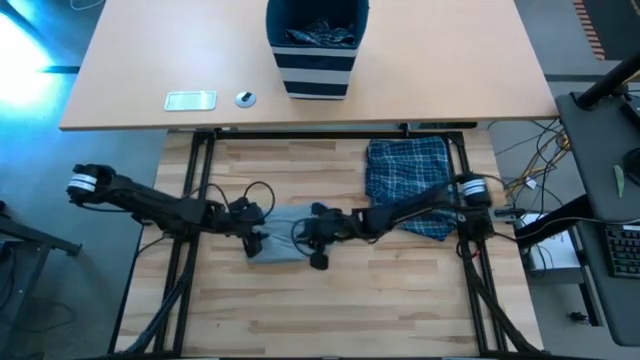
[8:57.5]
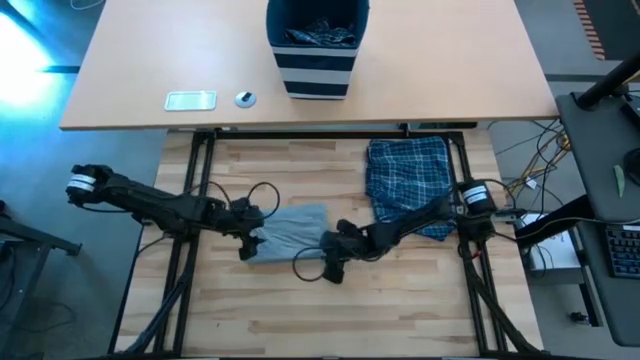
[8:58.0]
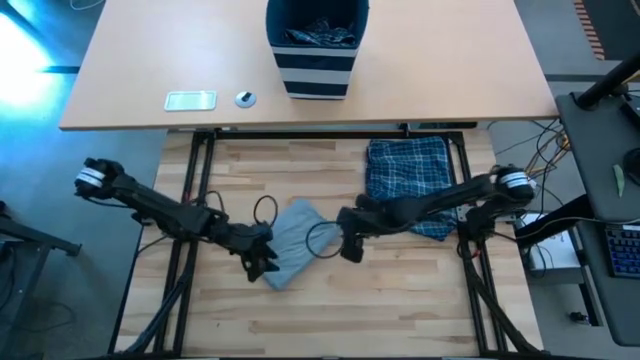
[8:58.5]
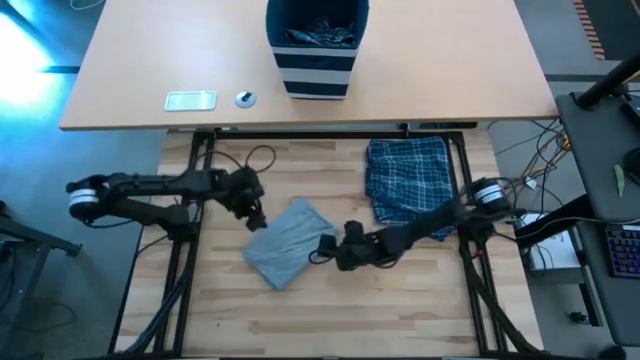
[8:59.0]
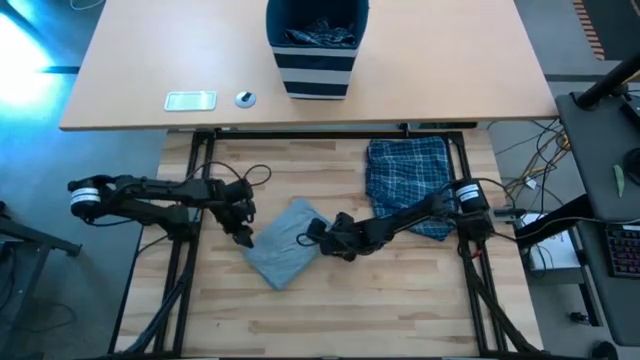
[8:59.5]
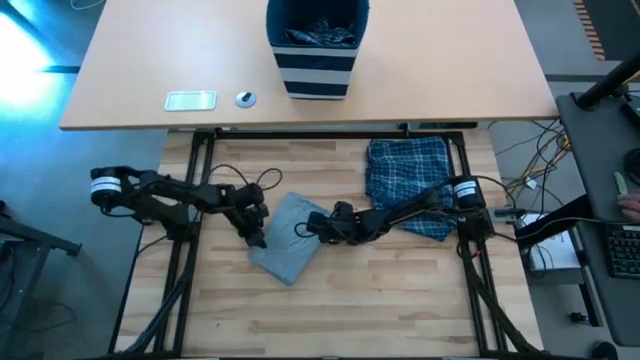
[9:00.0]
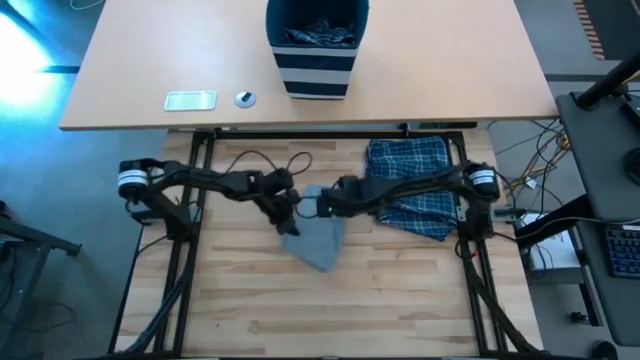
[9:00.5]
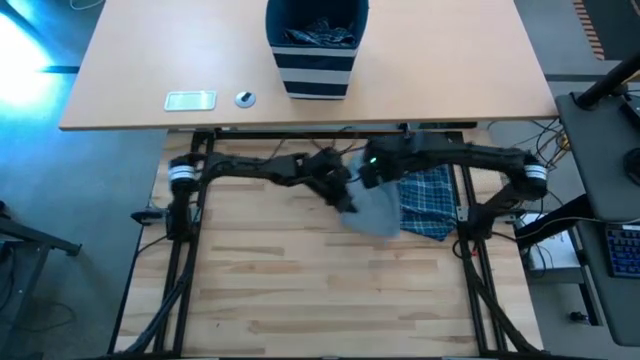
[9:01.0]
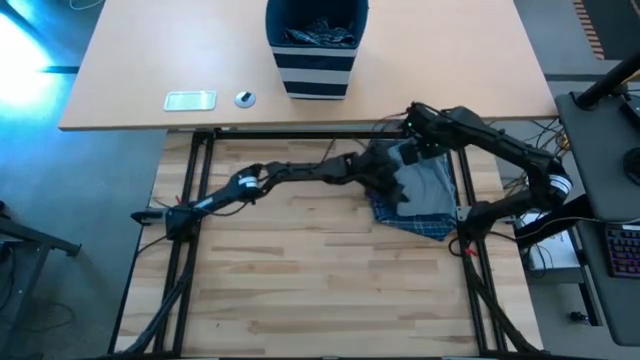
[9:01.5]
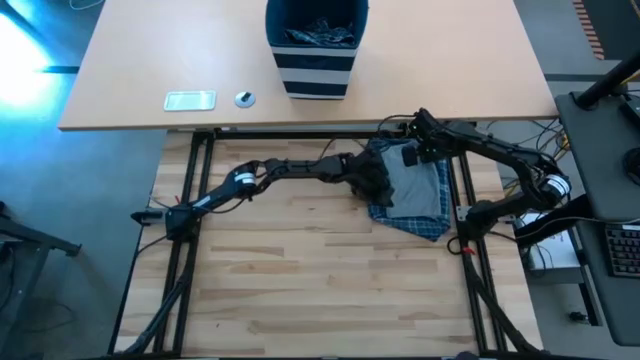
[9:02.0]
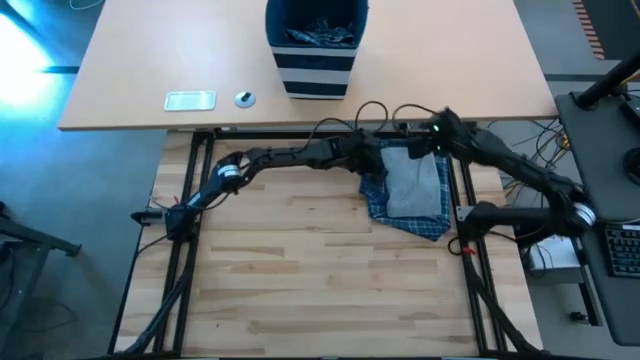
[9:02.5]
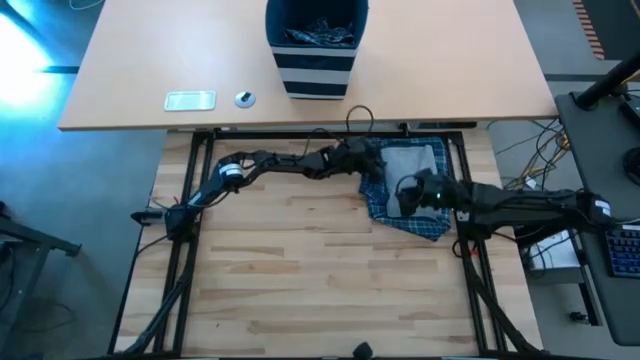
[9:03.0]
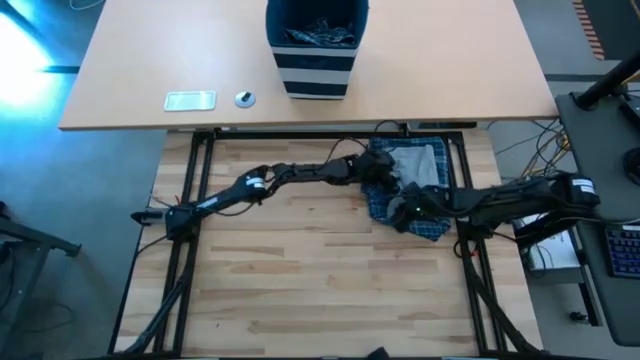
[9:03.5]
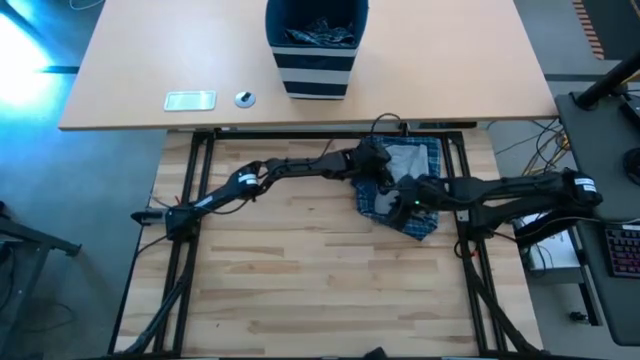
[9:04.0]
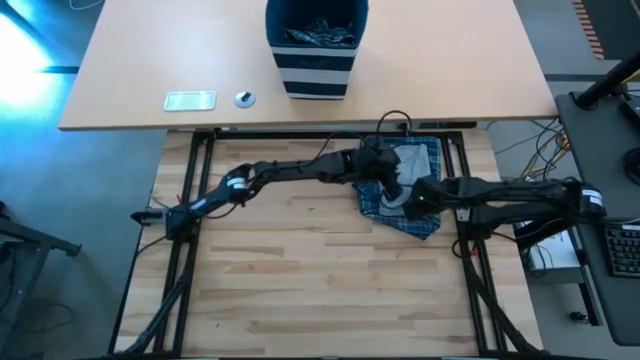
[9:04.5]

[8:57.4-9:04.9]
Task: Fold Laundry from Bin
Stack the gray shirt on top of the blue patterned pants

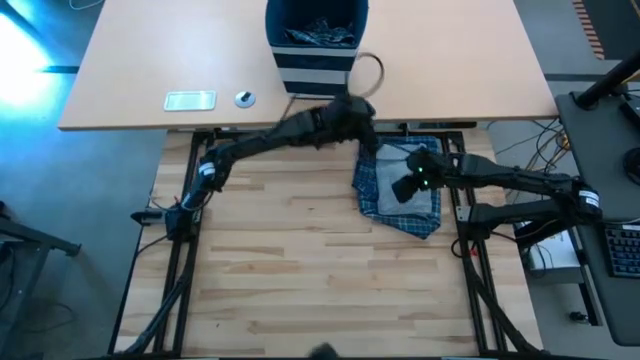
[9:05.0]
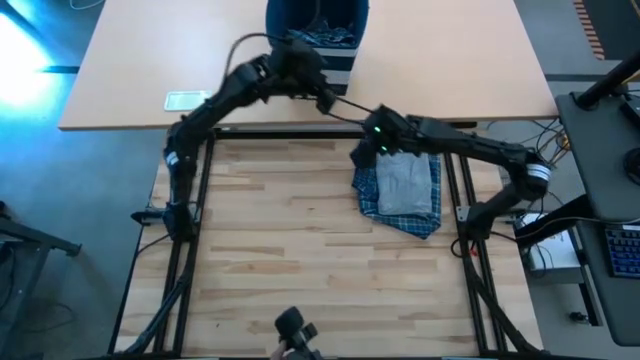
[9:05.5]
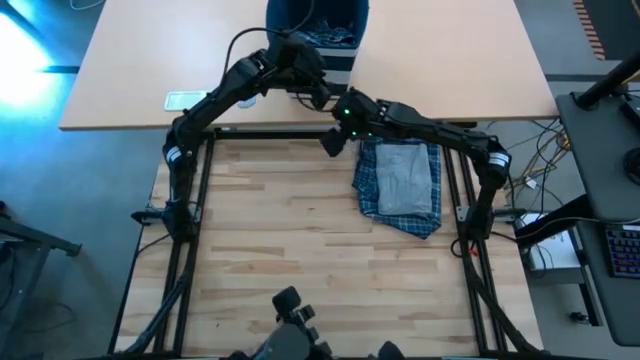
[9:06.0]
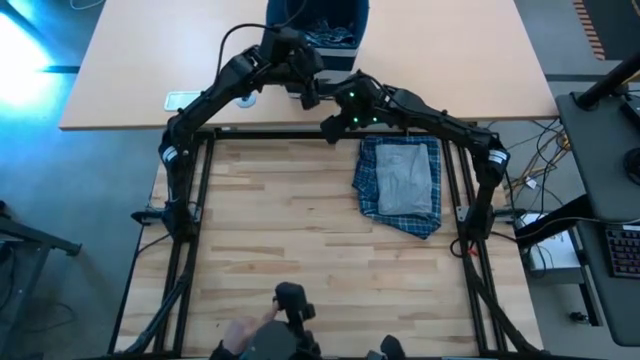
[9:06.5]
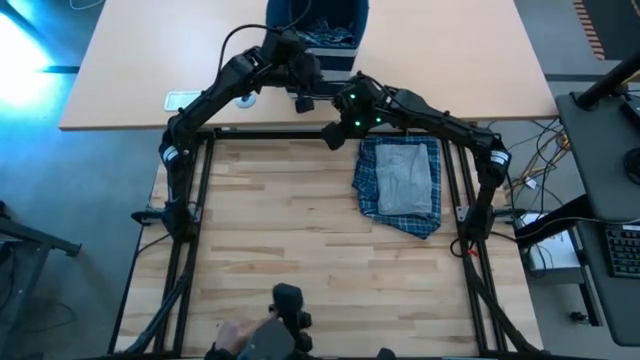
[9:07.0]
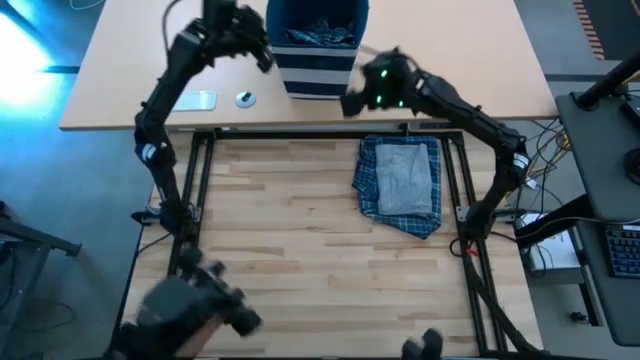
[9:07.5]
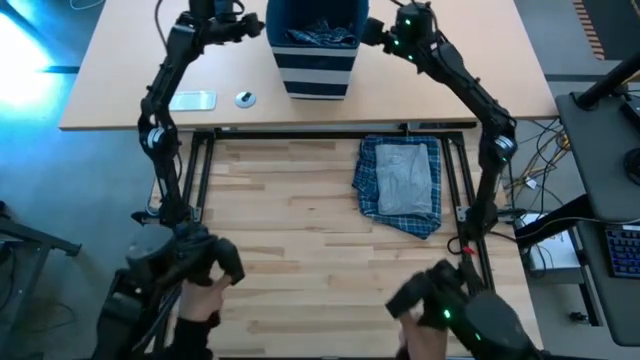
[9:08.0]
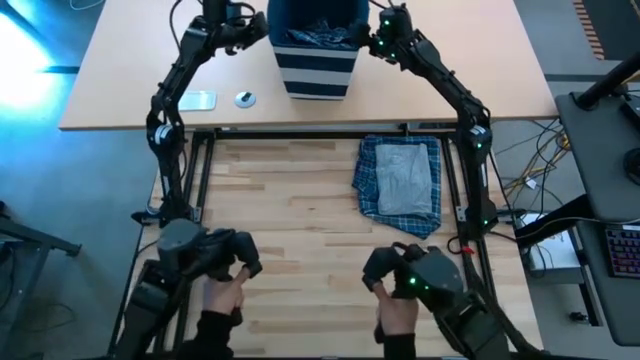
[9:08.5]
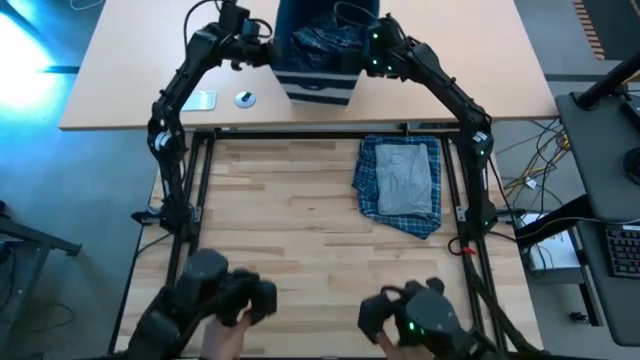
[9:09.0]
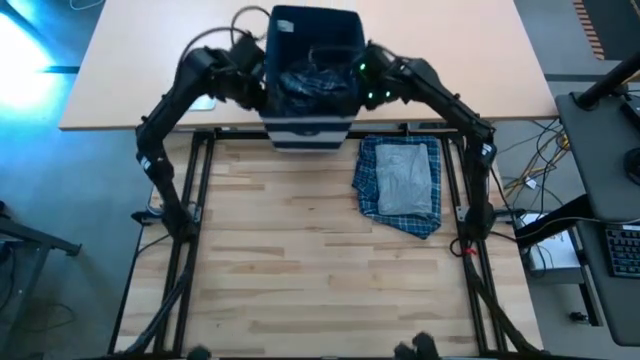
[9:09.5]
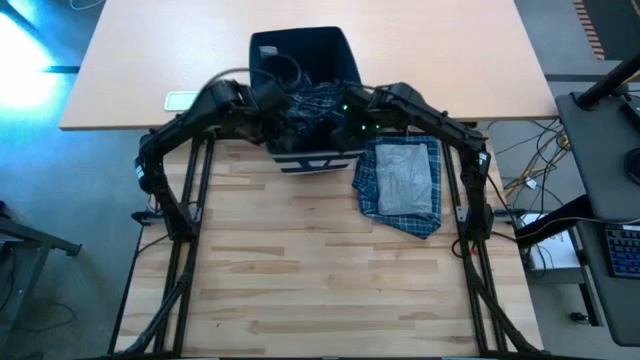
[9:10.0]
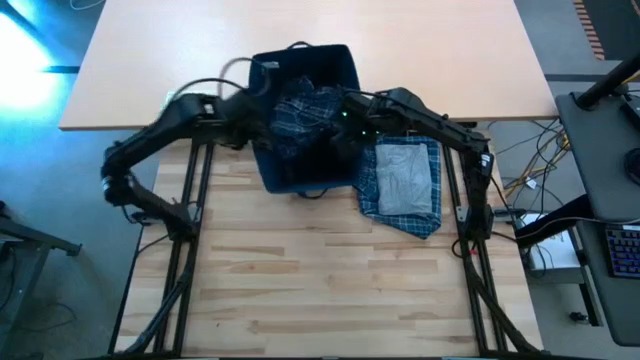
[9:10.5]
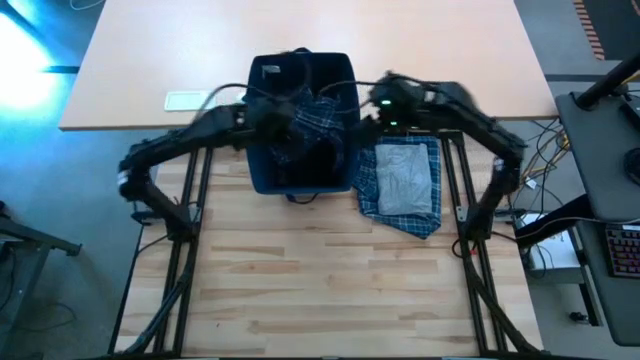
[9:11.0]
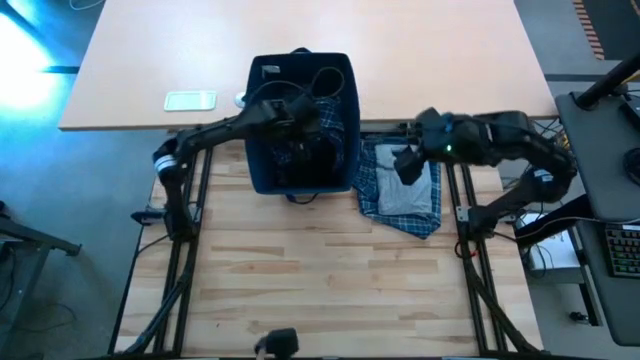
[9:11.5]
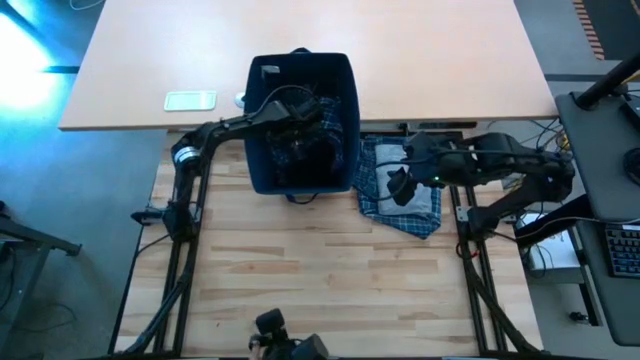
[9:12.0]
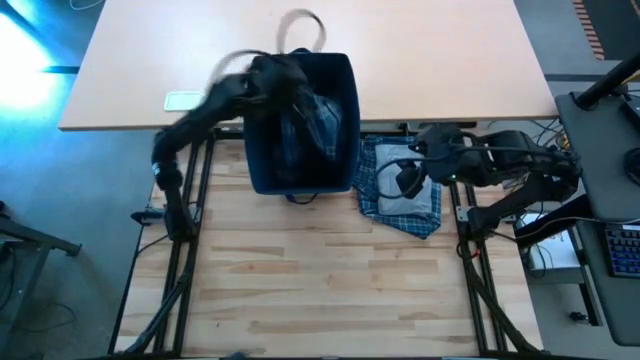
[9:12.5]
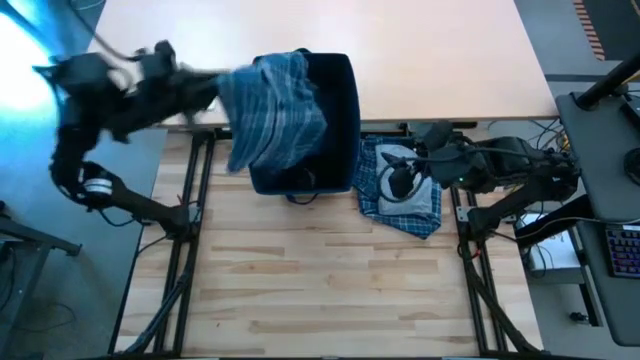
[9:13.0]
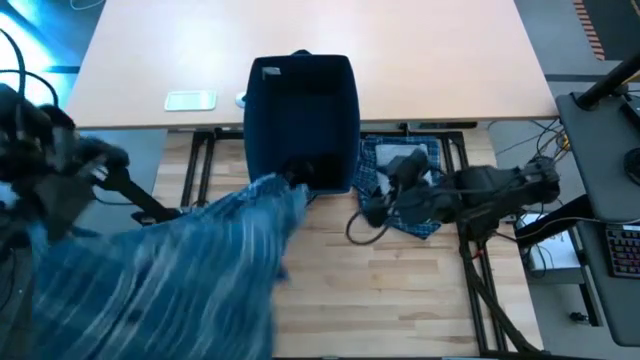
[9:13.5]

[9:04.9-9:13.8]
Remove the blue patterned long-sleeve from the laundry bin

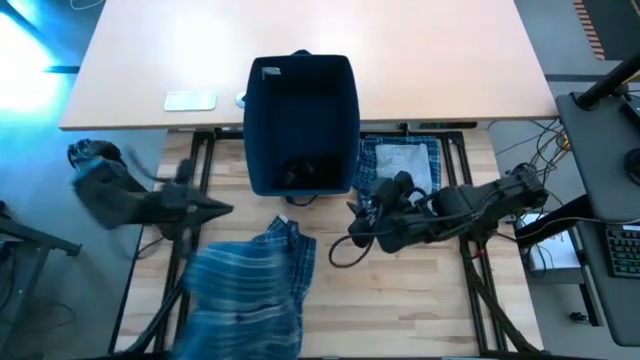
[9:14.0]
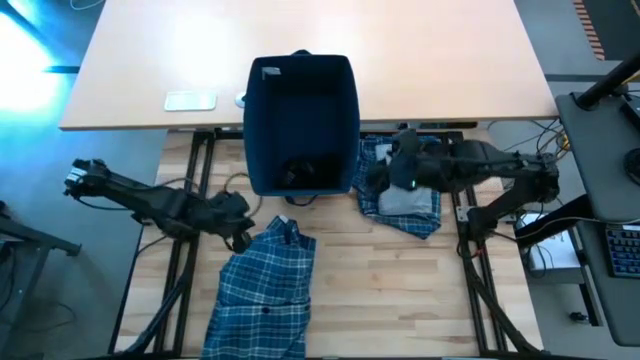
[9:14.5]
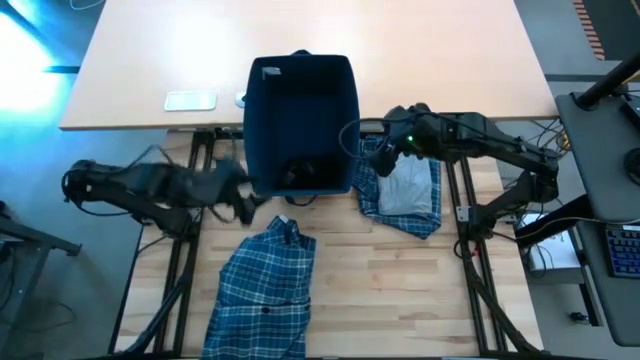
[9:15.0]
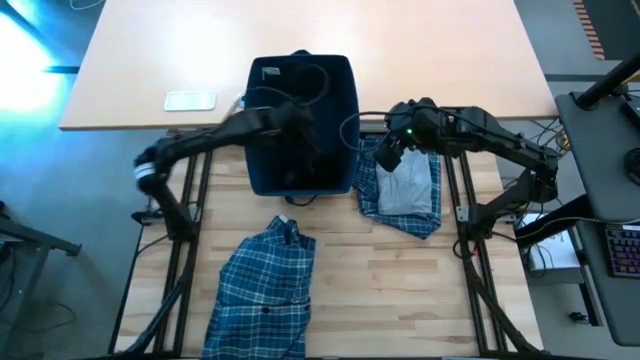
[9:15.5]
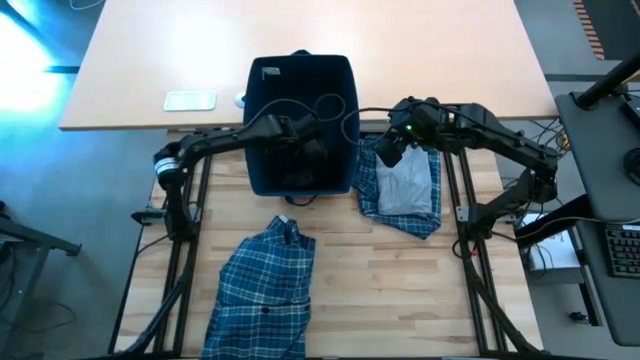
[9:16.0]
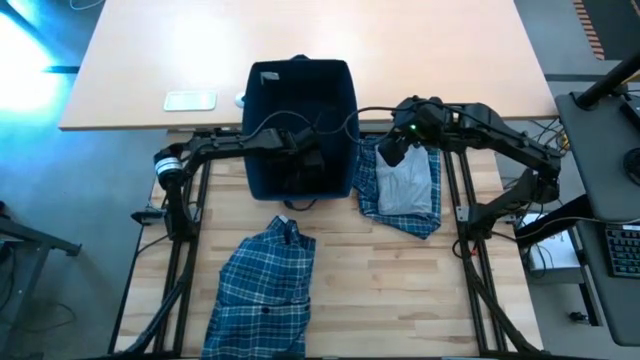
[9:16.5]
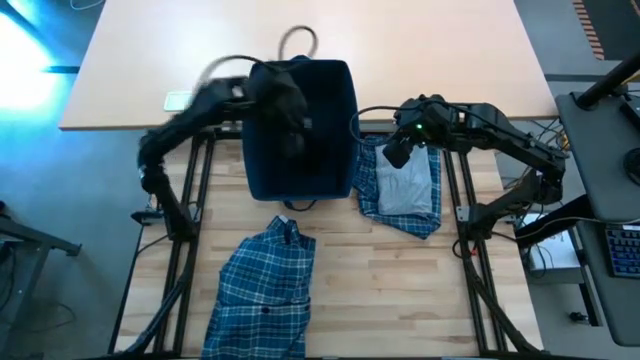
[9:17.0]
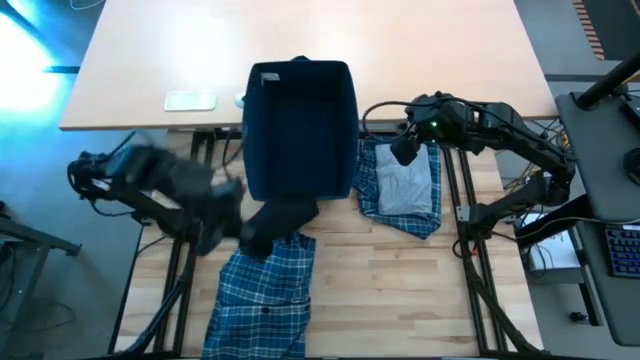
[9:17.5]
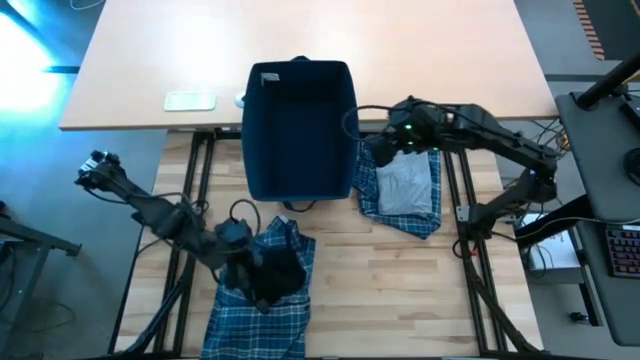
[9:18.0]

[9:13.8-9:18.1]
Remove the black underwear from the laundry bin
